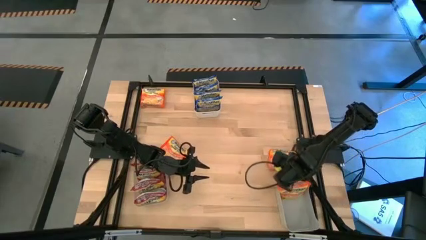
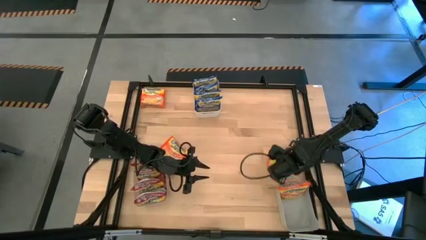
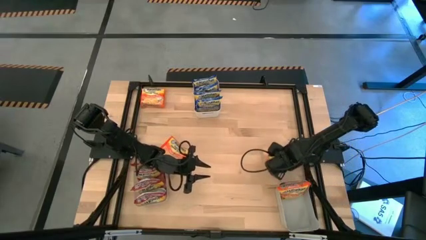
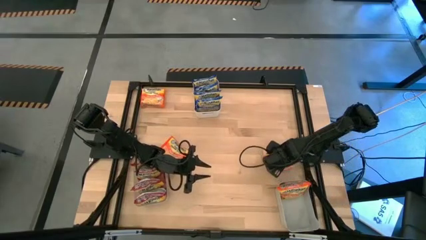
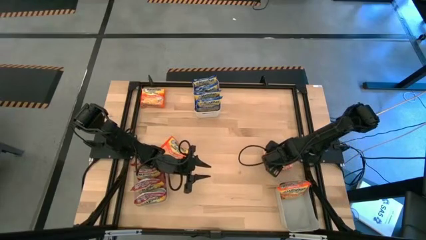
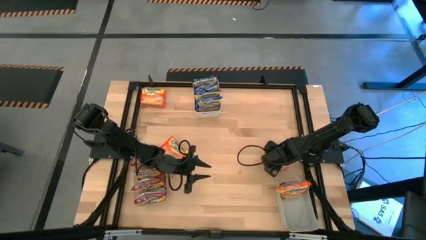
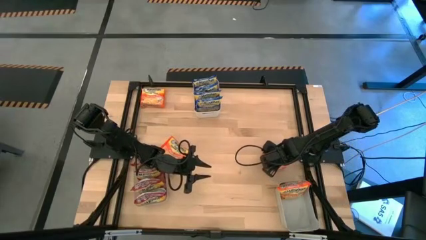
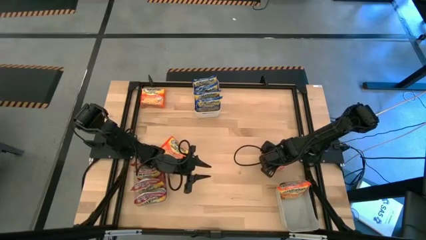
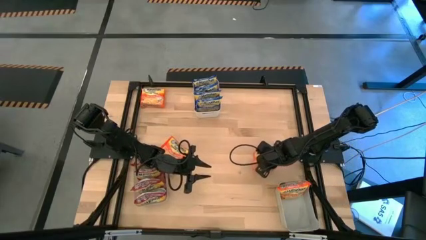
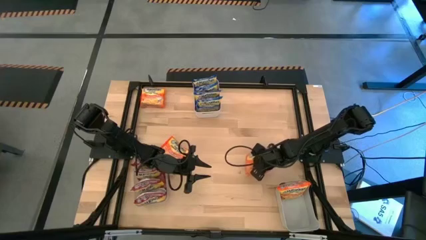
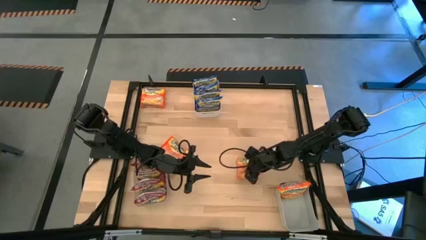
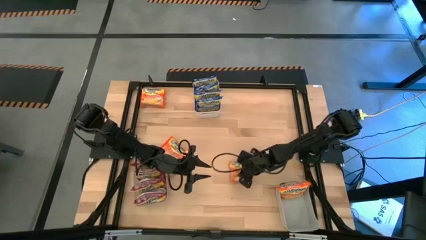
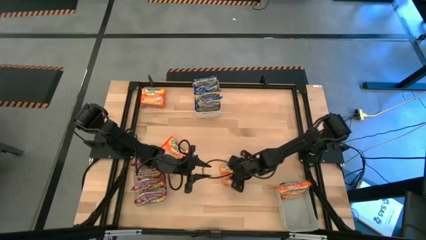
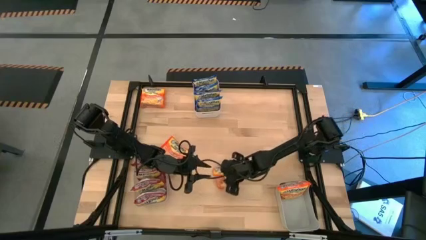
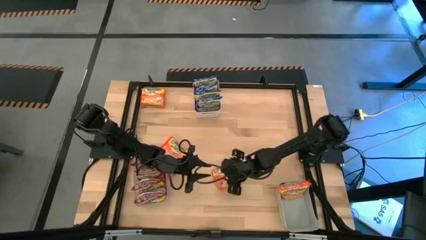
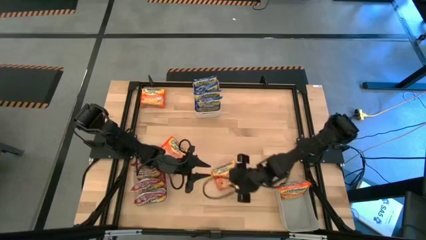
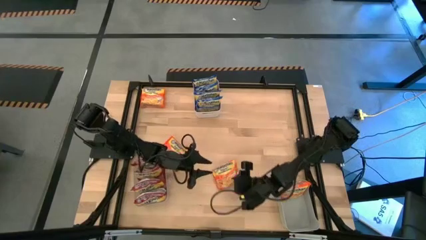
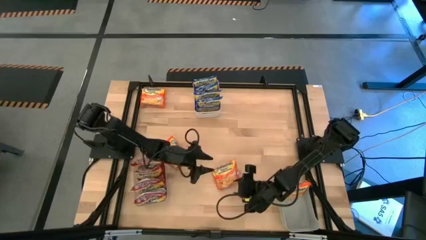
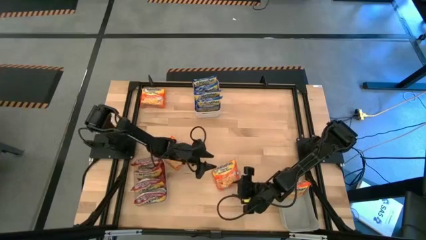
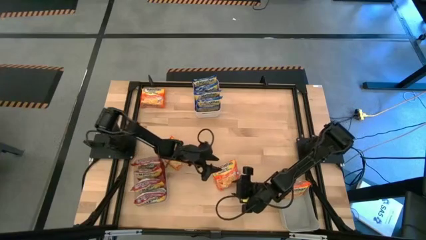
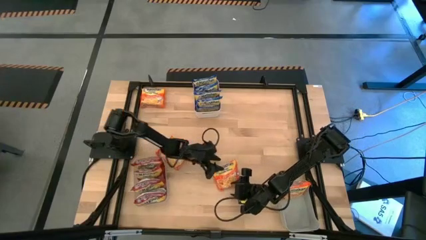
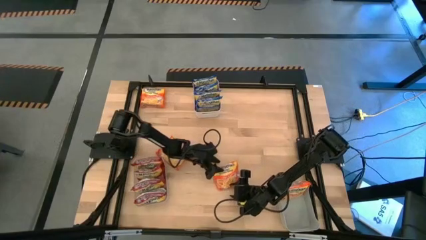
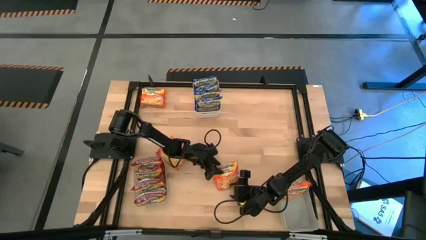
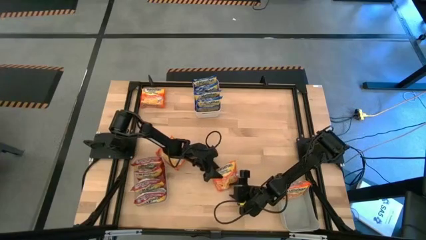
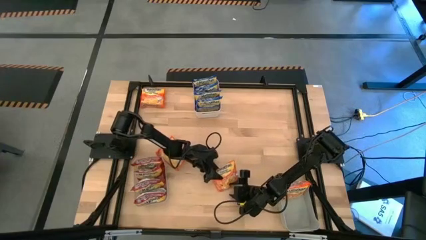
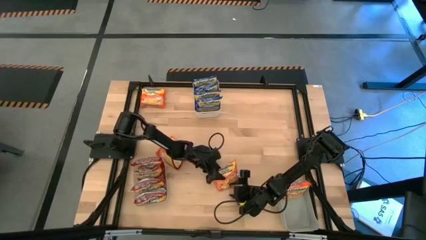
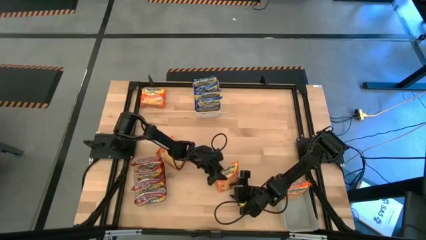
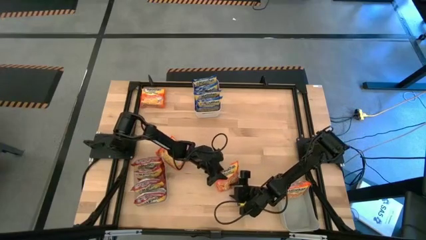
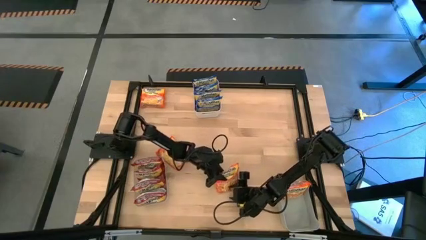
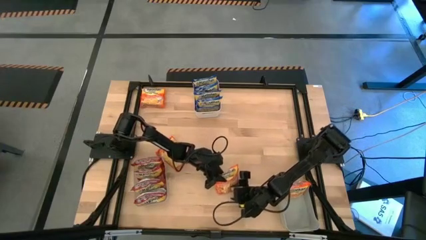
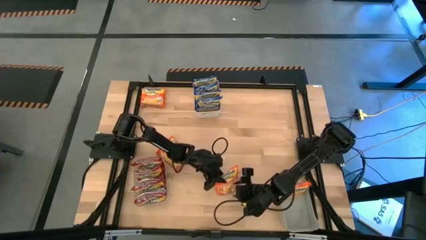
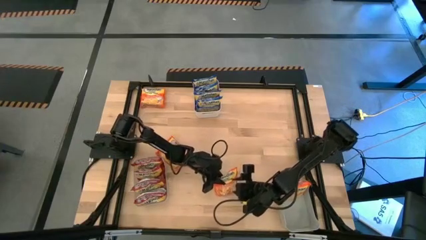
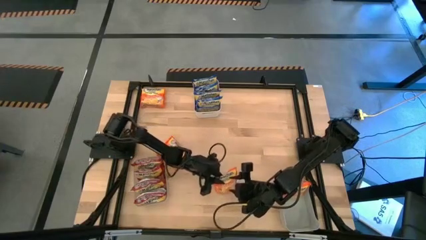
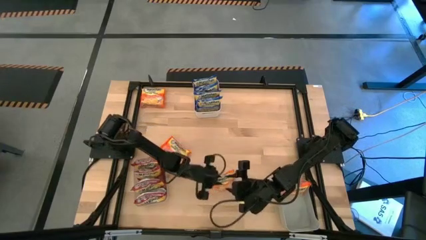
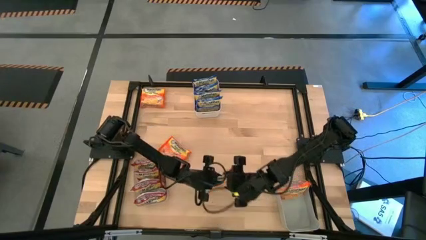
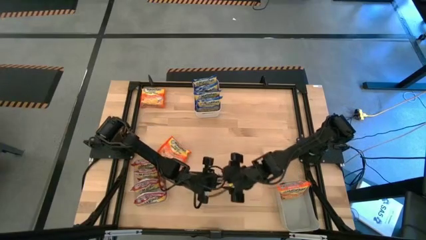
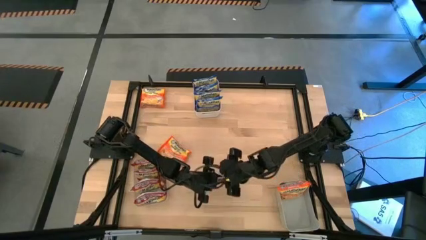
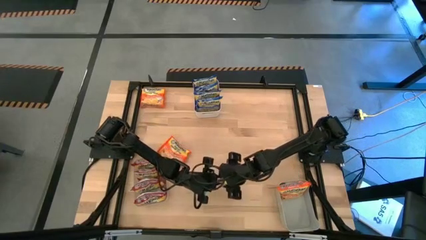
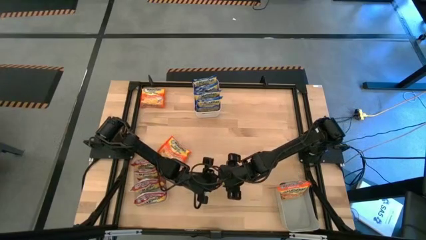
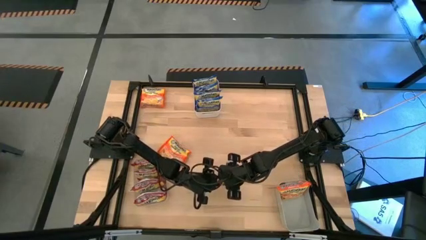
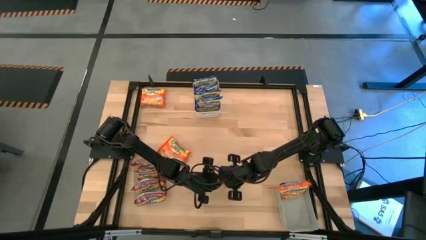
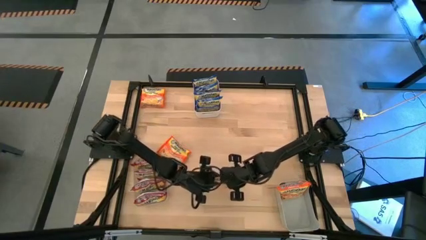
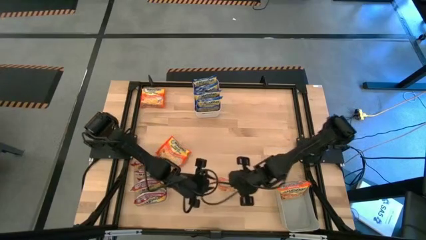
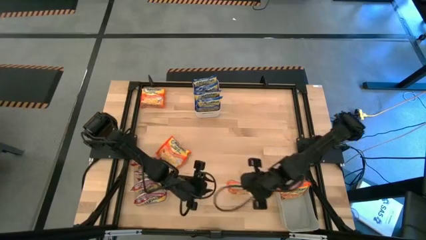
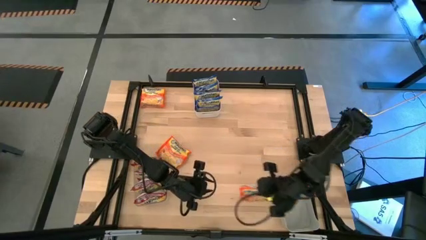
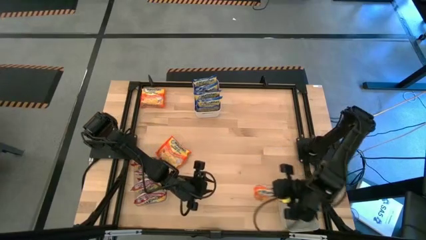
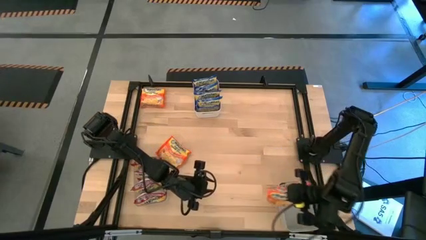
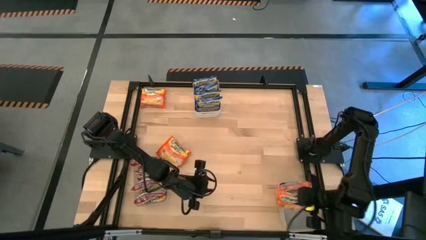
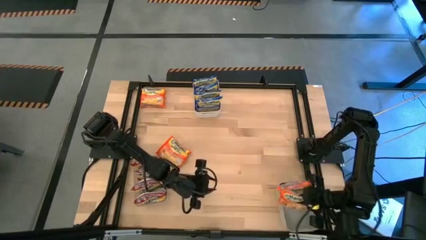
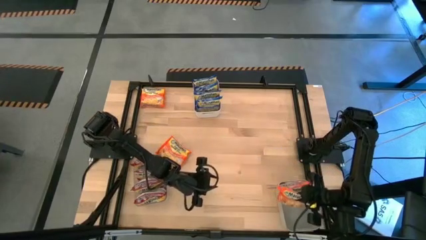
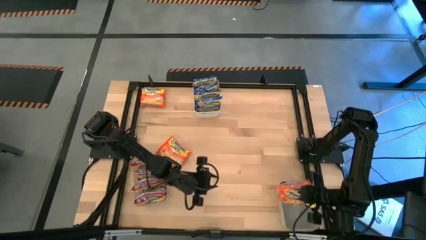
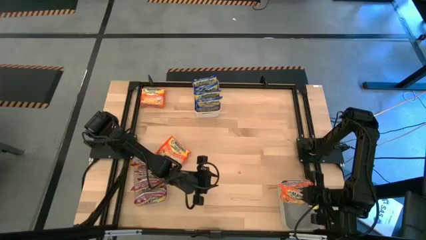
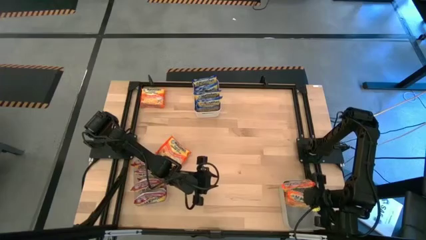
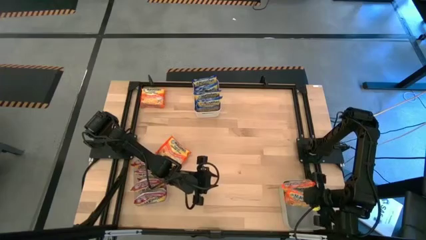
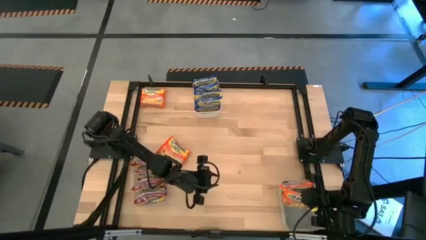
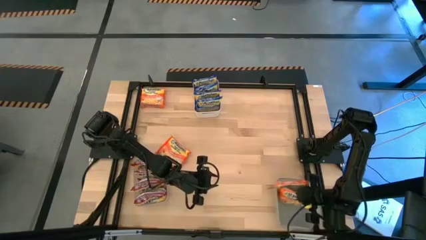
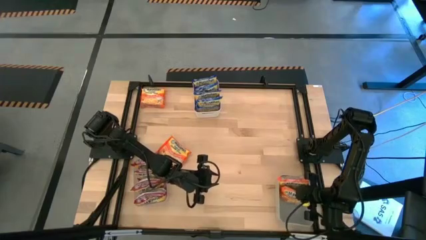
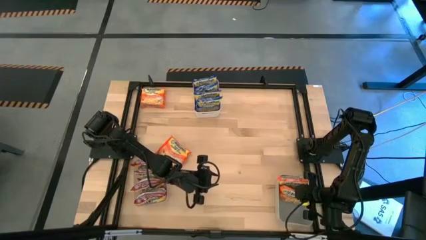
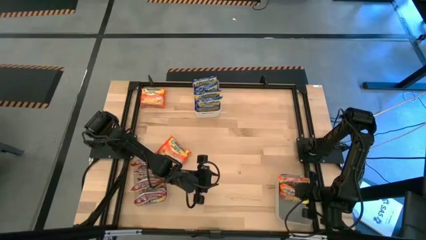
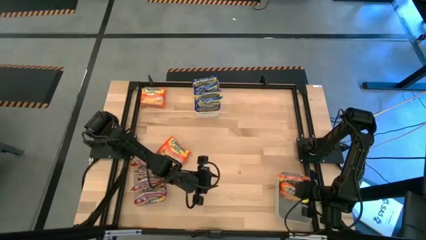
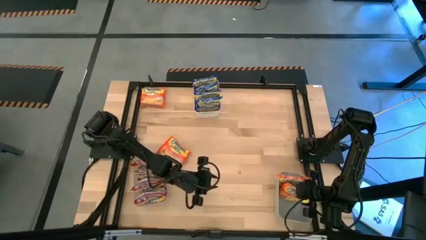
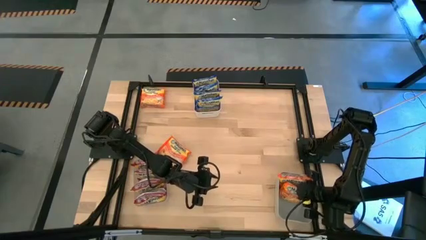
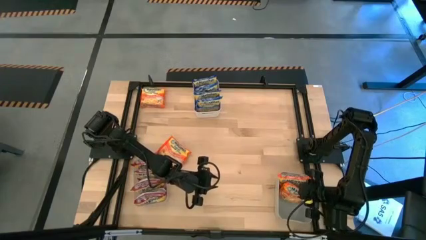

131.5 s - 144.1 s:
Task: Sort Maruchan noodles
Put the orange noodle pack into the gray bin

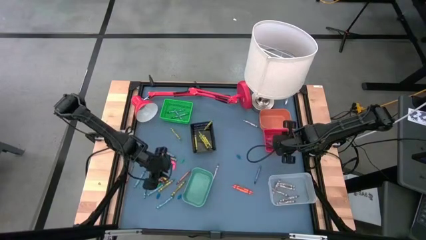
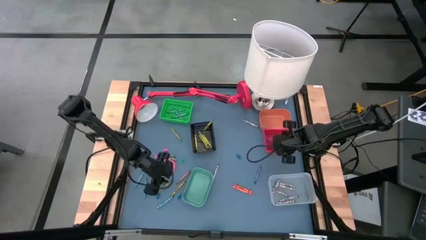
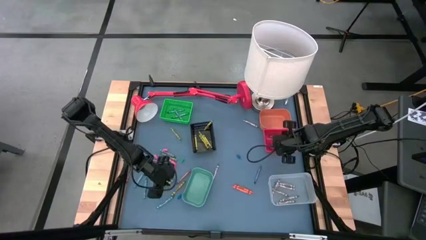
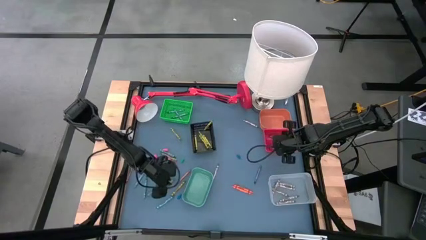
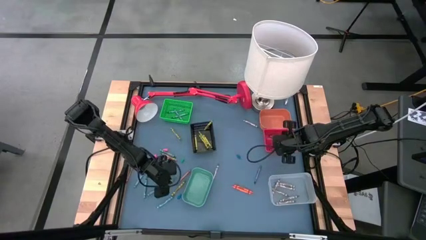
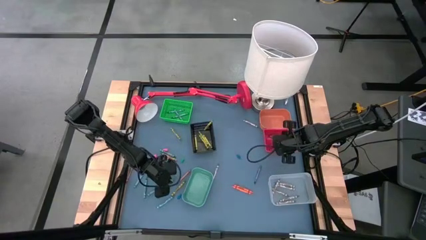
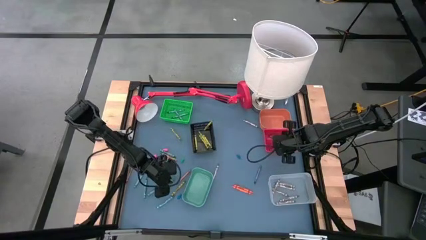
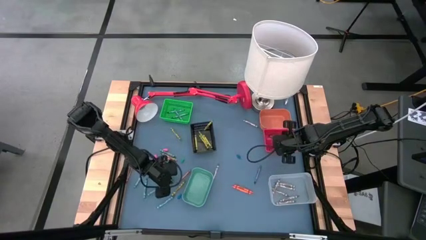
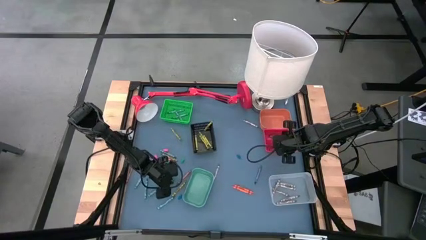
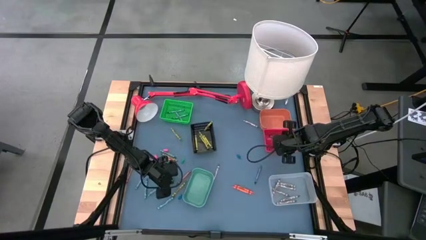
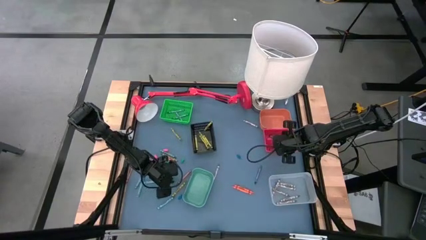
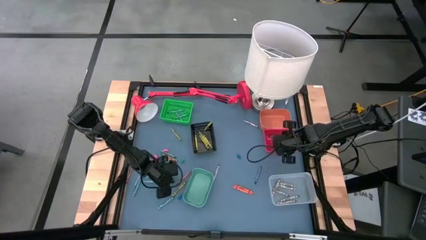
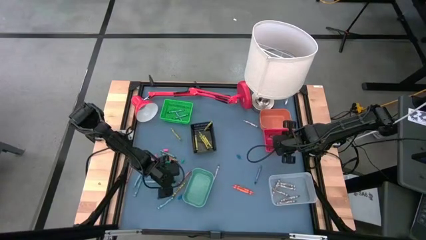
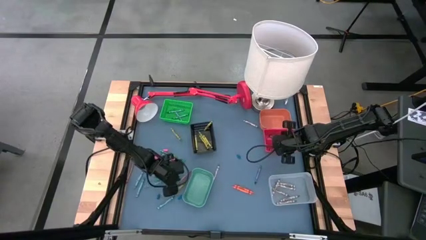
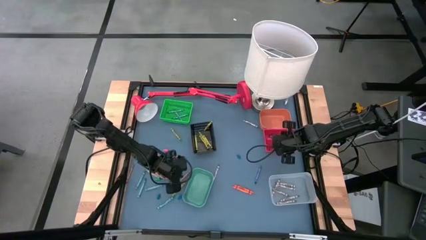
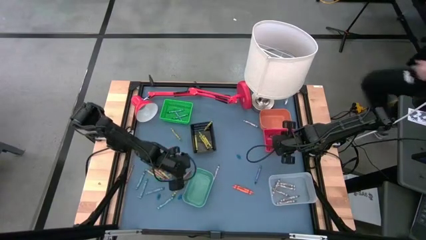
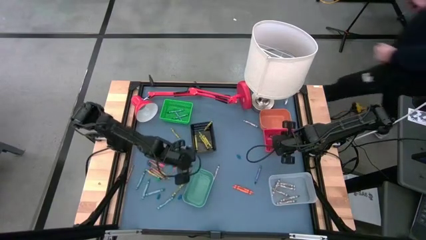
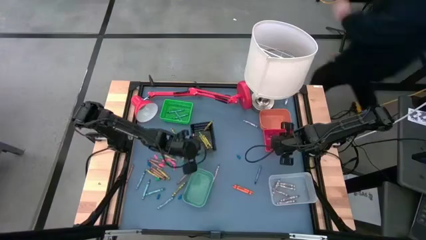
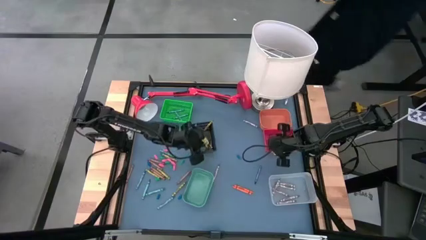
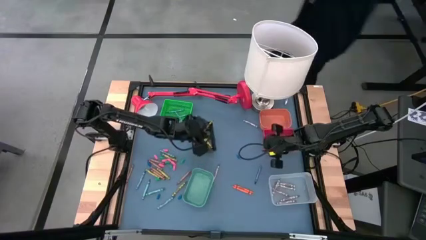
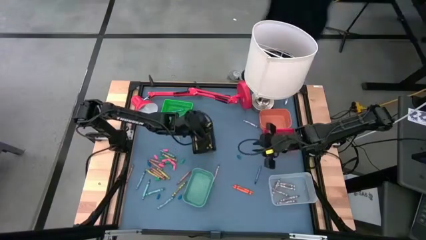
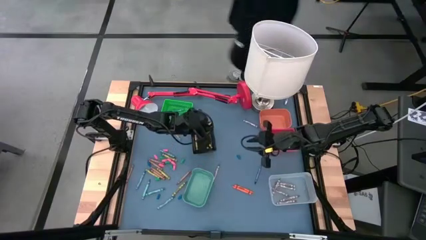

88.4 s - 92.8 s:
Task: Sort crayons
Put the green crayon into the black bin
